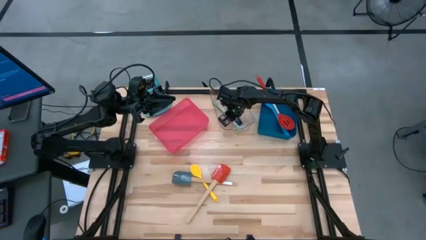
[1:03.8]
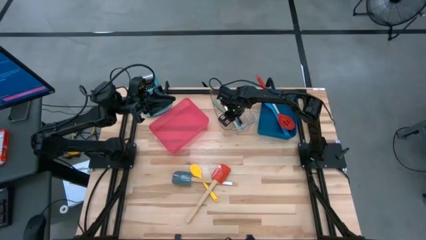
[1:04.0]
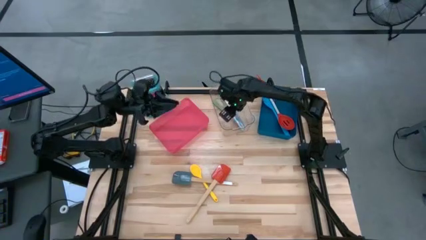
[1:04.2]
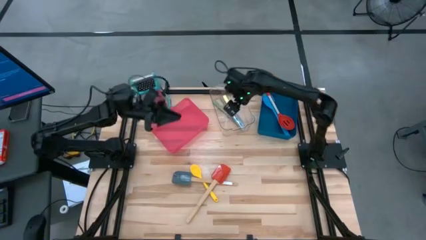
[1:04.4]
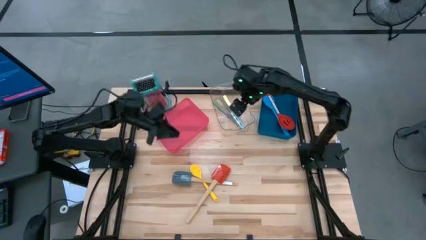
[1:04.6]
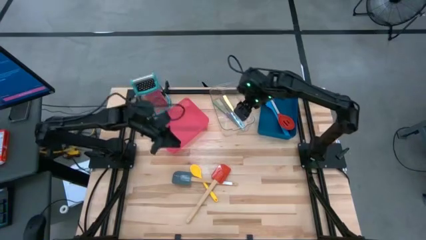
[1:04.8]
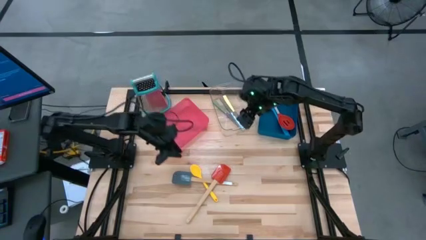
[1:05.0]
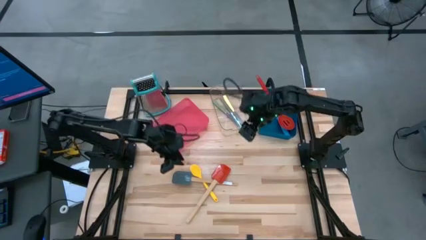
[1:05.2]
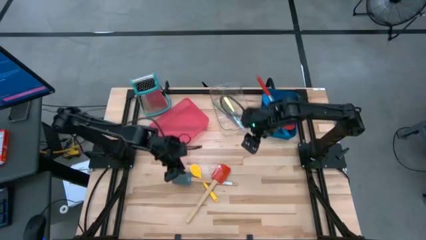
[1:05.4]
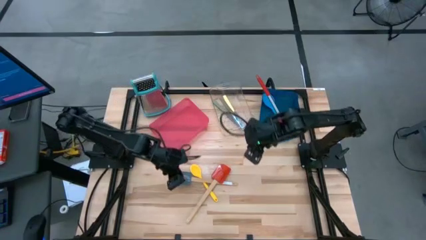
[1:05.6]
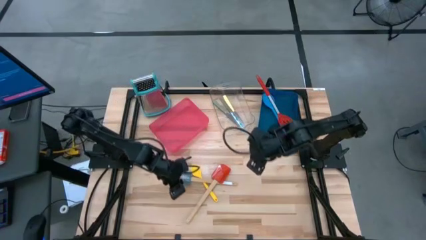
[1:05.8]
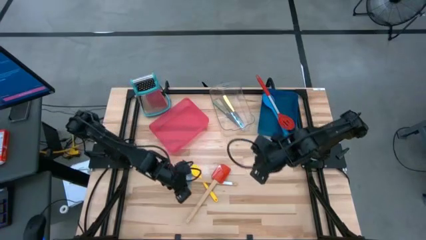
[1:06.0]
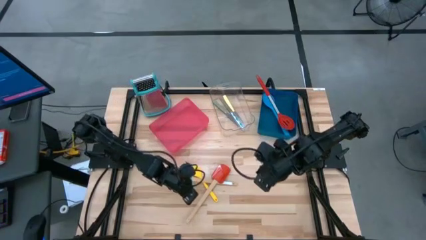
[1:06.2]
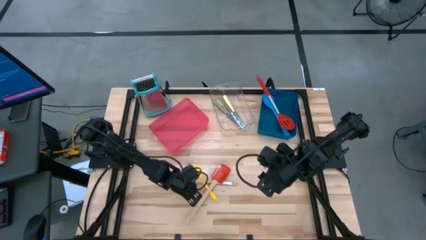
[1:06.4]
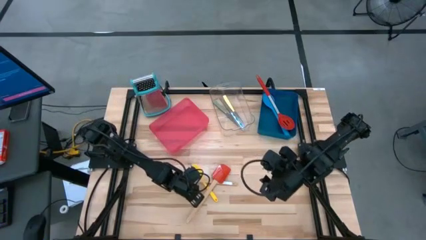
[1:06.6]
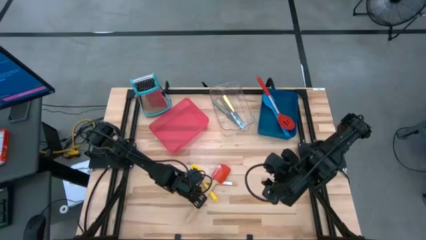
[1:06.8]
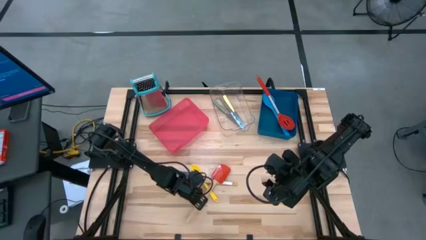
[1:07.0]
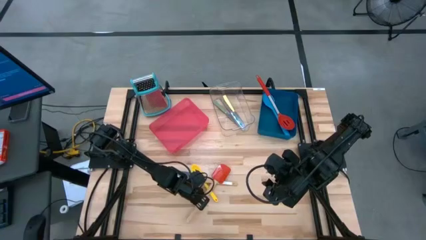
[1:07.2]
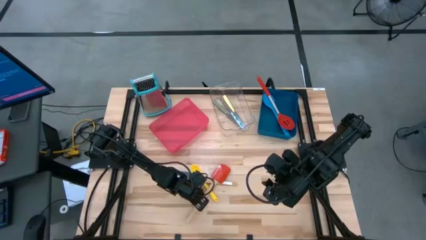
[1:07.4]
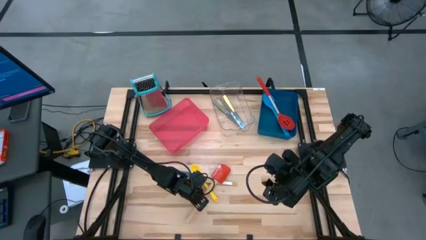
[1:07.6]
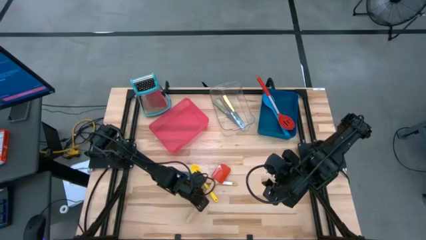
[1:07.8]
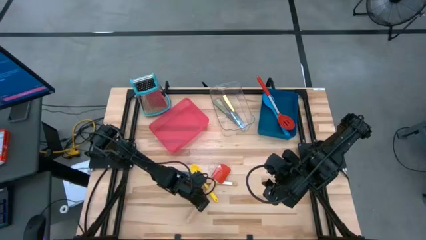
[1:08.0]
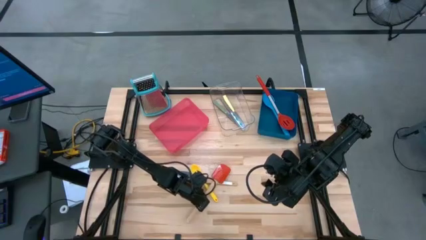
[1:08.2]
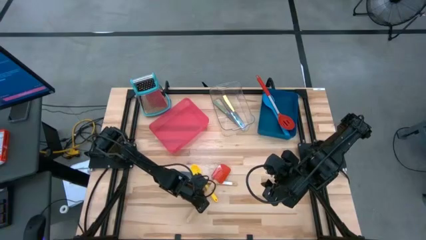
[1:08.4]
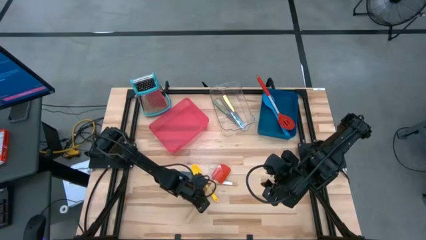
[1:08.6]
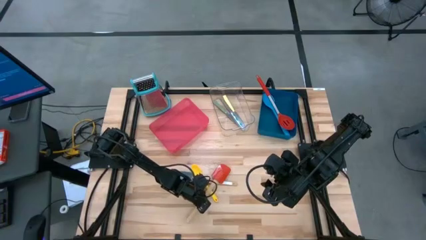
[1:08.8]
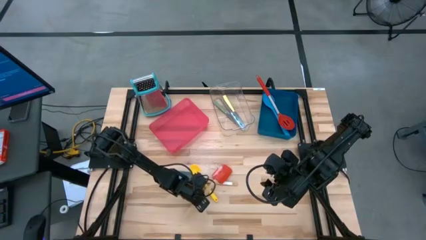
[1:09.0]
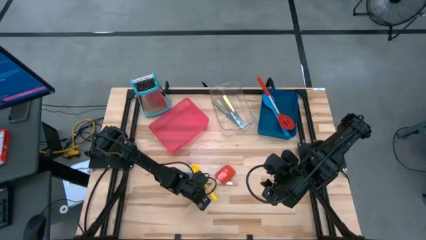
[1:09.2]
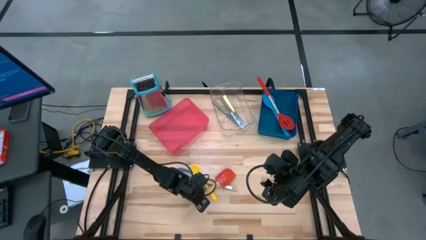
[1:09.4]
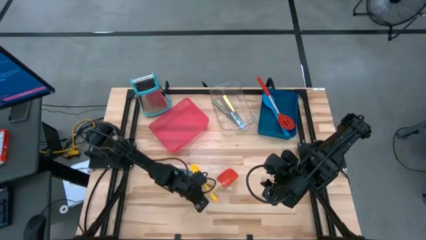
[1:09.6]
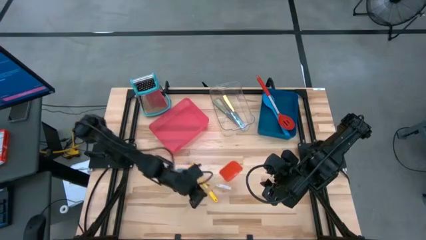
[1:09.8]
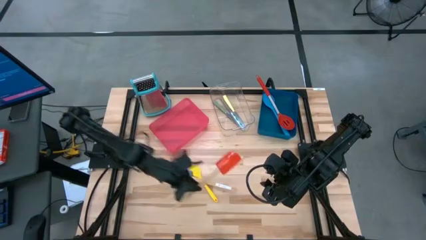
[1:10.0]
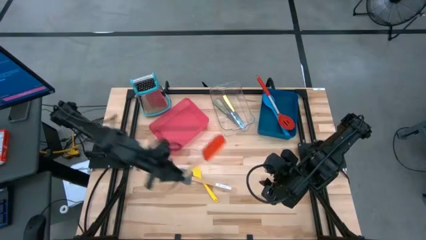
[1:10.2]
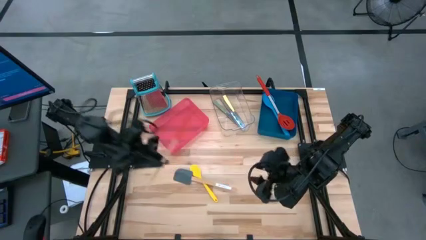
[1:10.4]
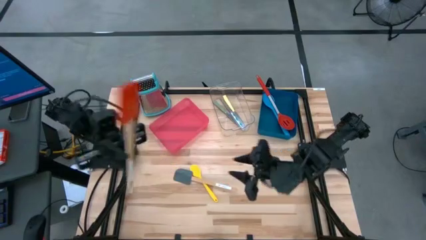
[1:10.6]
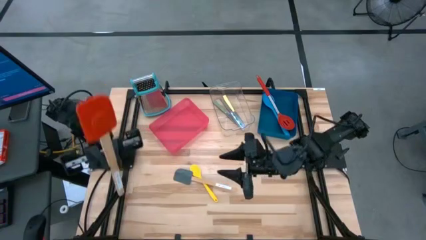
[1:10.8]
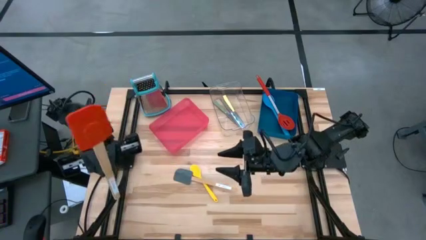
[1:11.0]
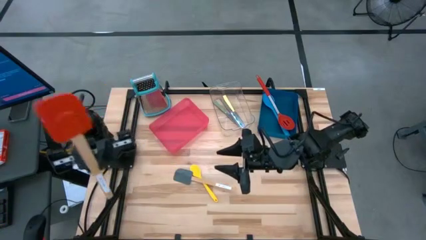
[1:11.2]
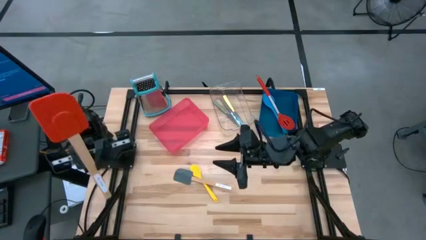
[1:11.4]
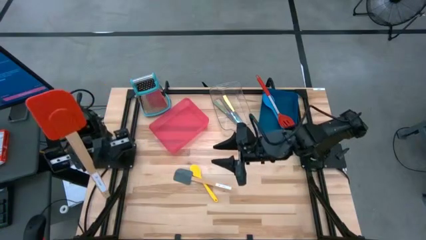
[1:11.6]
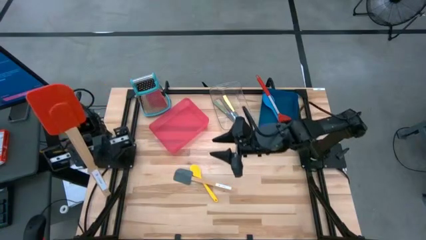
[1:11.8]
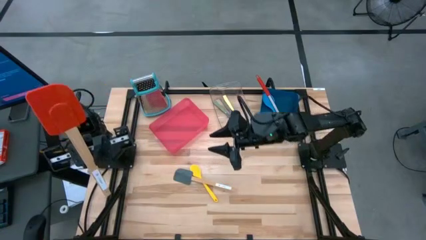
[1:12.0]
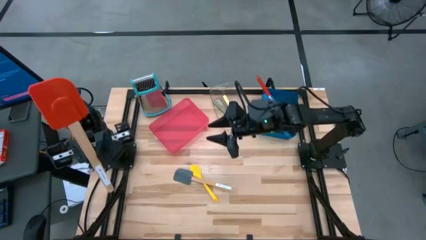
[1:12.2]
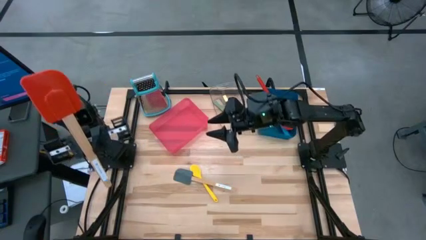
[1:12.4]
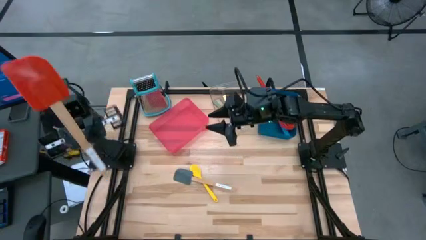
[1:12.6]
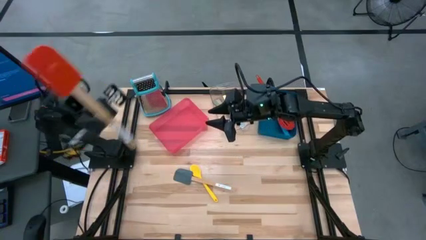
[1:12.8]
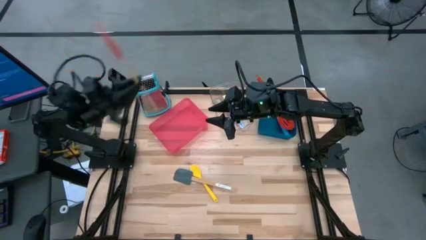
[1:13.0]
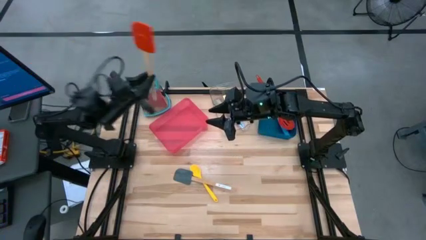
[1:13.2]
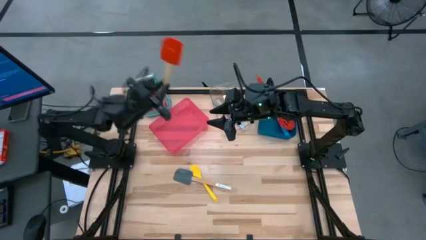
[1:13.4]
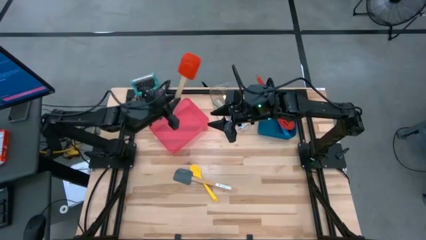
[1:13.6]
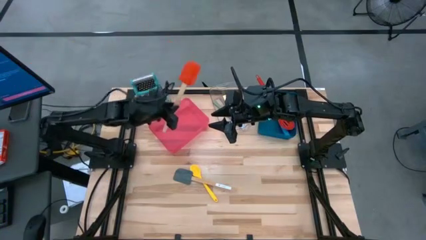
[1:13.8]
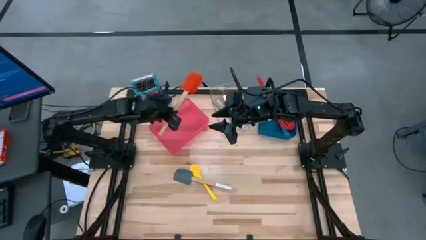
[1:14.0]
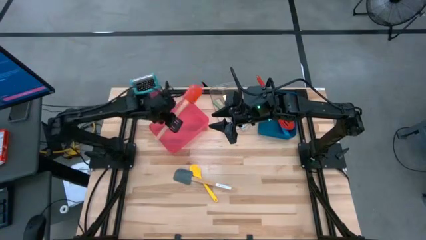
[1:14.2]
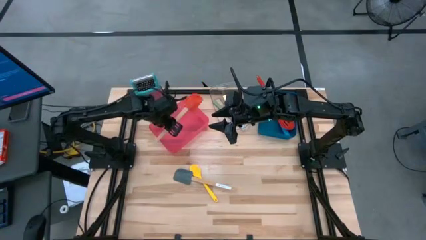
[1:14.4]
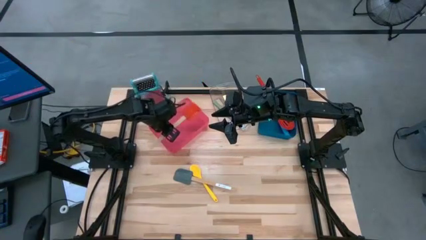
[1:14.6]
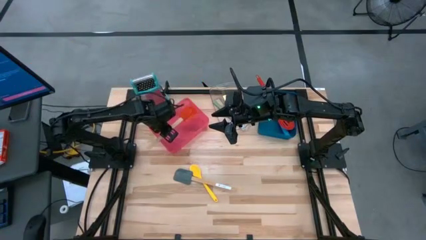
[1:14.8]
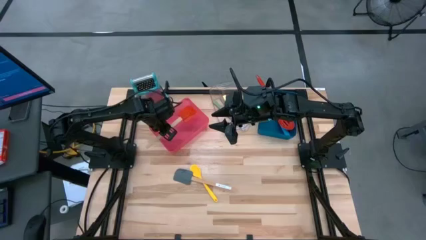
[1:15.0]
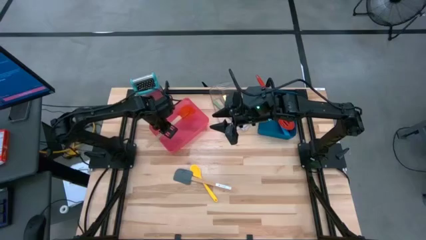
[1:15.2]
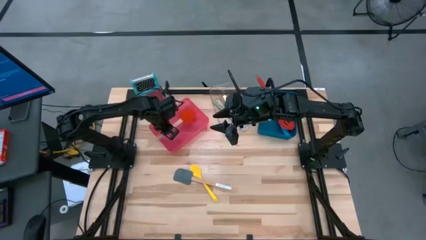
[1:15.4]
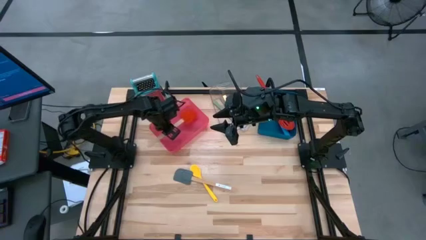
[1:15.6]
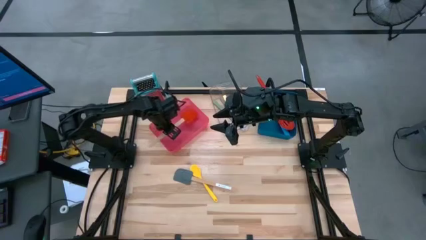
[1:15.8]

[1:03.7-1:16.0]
Task: Pick & Place Kitchen Items
Put the red spatula into the red bin
